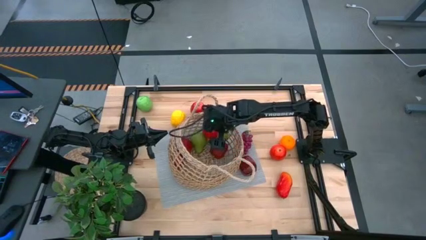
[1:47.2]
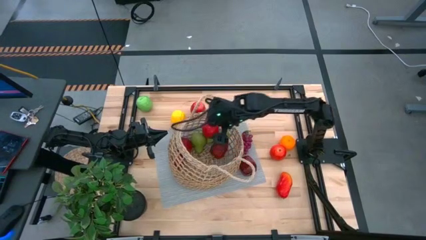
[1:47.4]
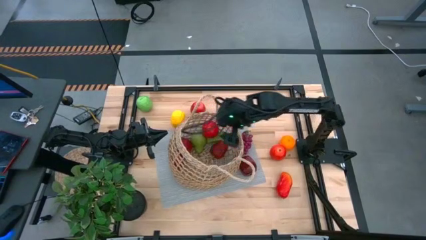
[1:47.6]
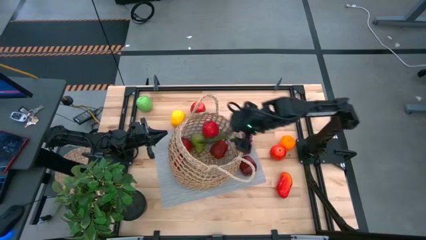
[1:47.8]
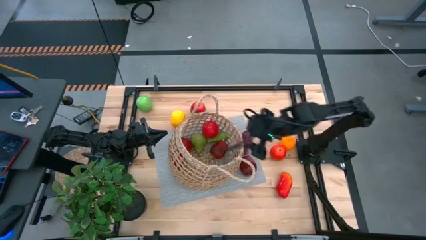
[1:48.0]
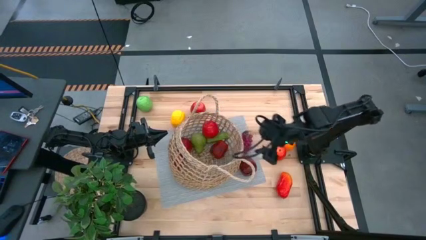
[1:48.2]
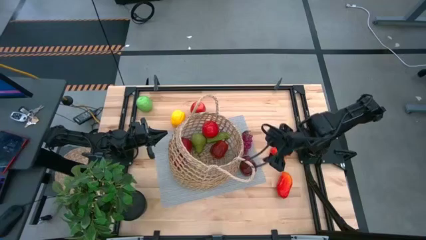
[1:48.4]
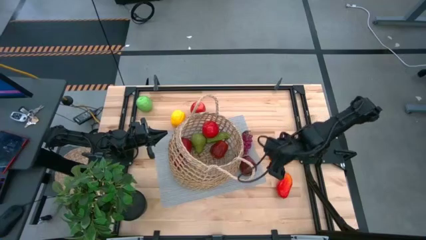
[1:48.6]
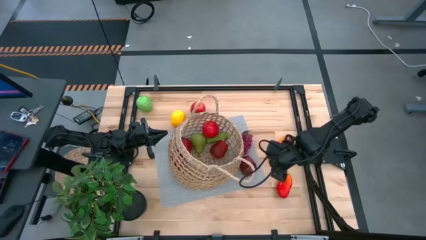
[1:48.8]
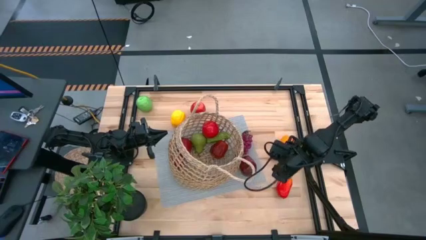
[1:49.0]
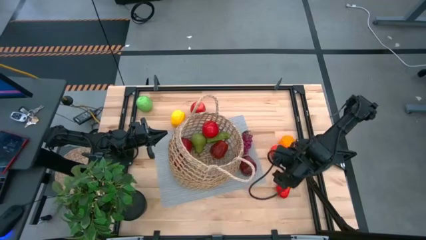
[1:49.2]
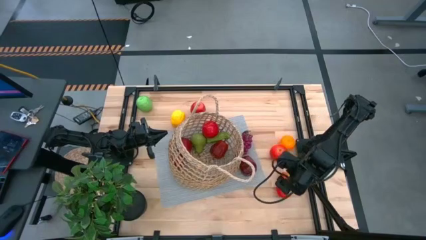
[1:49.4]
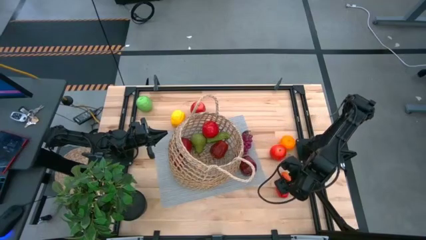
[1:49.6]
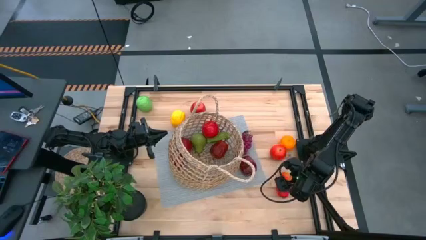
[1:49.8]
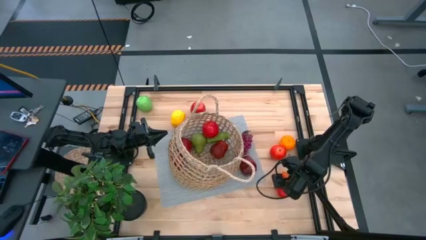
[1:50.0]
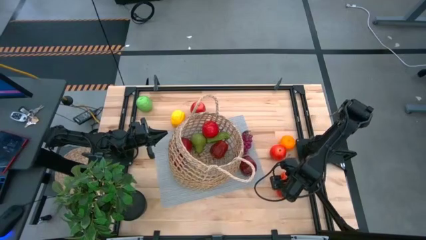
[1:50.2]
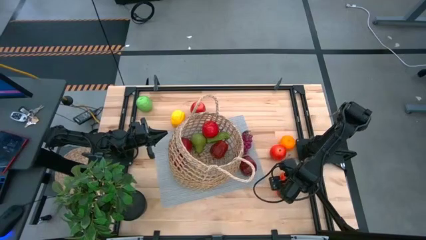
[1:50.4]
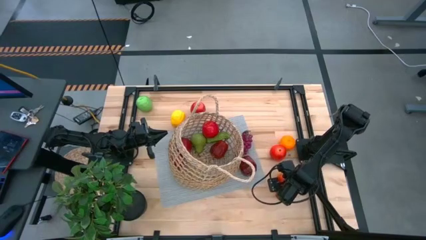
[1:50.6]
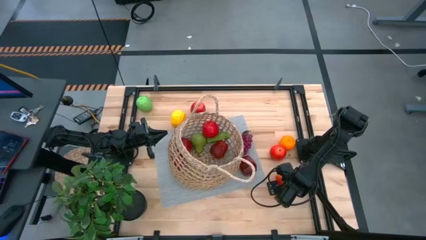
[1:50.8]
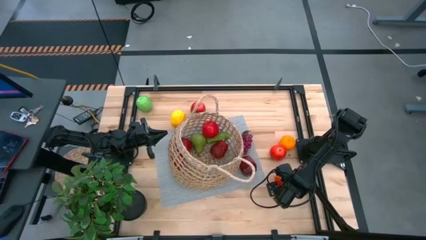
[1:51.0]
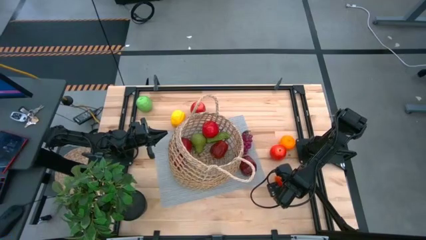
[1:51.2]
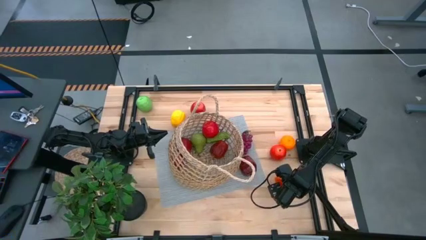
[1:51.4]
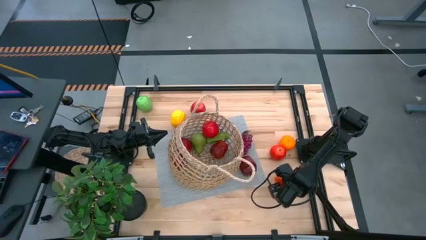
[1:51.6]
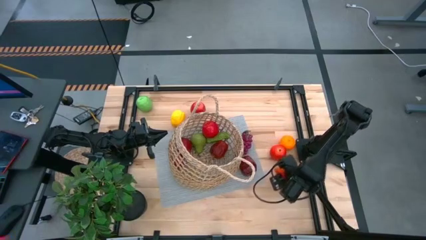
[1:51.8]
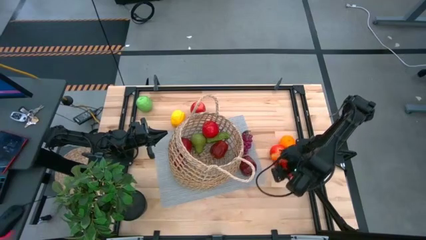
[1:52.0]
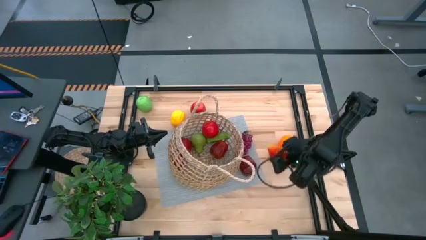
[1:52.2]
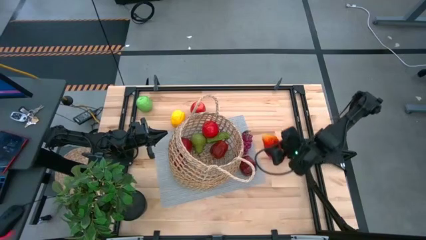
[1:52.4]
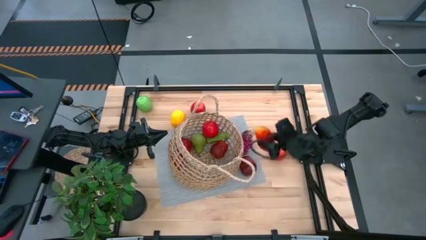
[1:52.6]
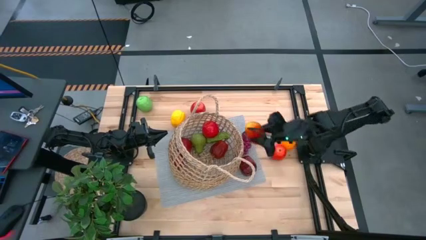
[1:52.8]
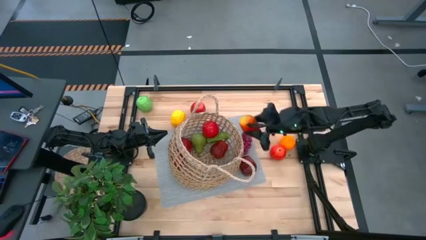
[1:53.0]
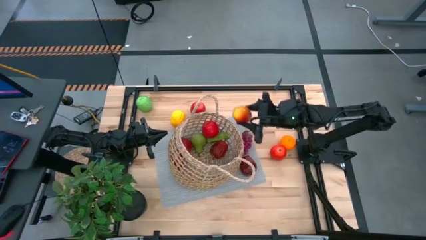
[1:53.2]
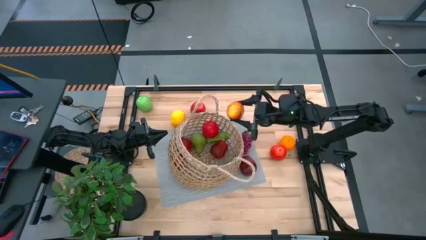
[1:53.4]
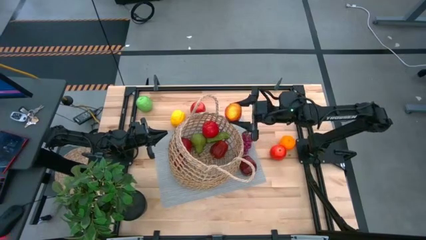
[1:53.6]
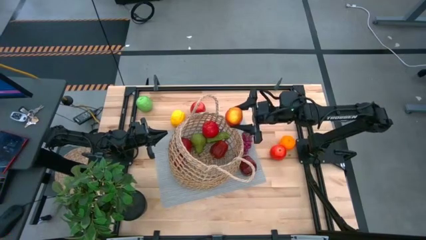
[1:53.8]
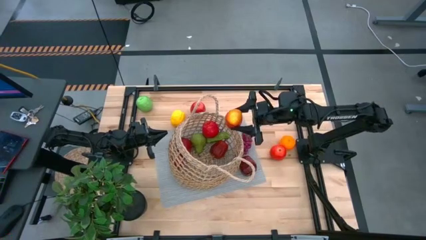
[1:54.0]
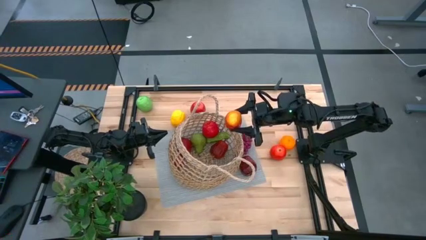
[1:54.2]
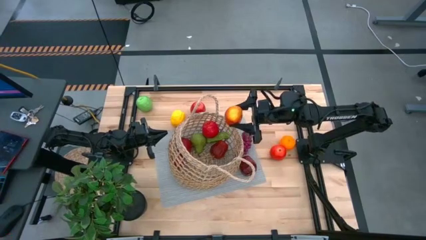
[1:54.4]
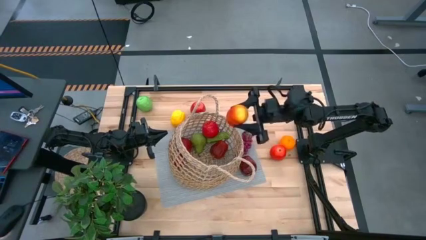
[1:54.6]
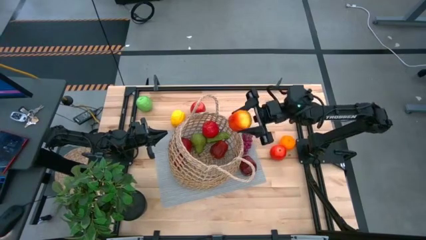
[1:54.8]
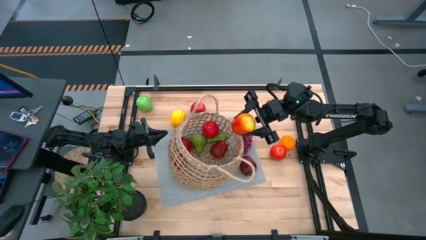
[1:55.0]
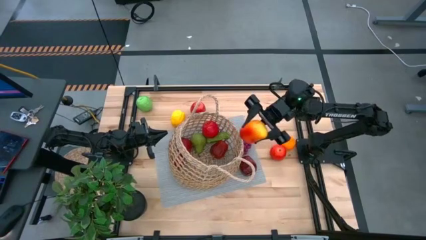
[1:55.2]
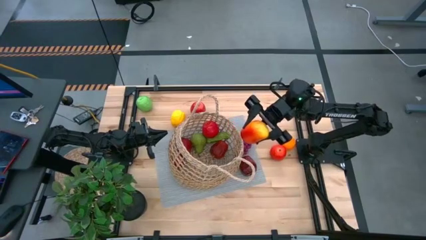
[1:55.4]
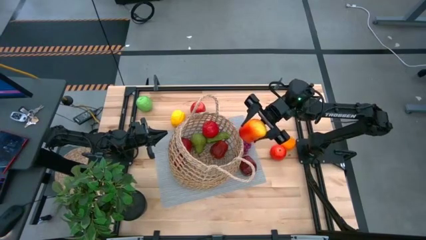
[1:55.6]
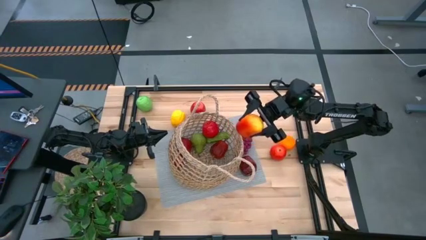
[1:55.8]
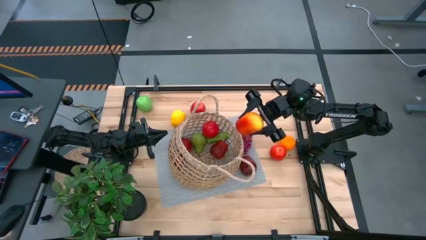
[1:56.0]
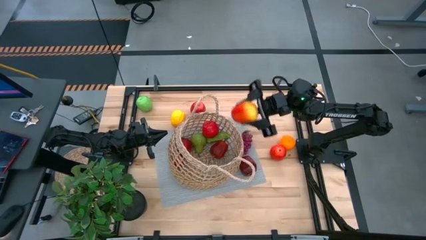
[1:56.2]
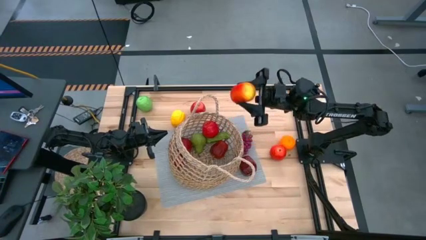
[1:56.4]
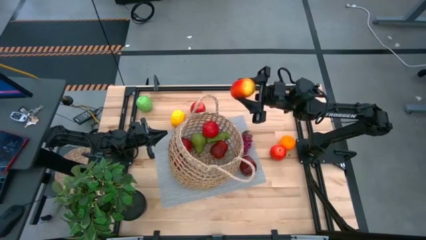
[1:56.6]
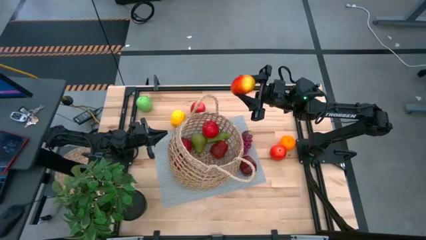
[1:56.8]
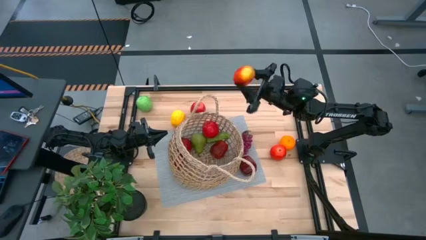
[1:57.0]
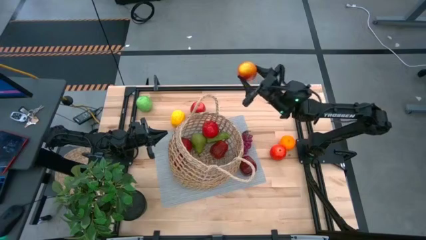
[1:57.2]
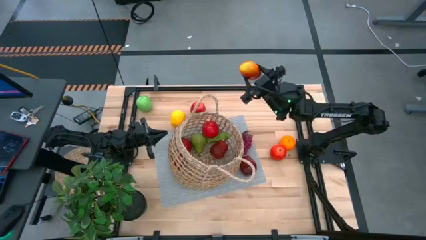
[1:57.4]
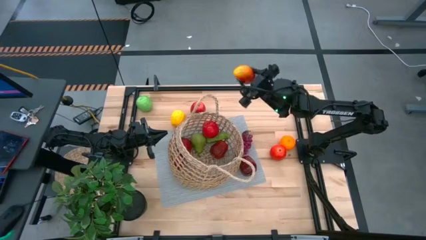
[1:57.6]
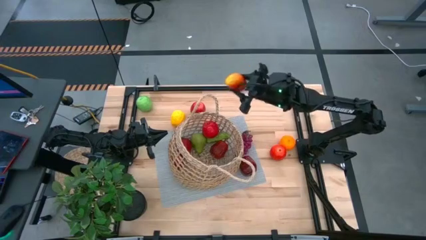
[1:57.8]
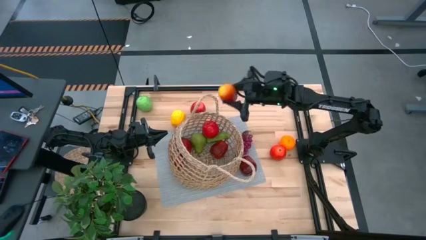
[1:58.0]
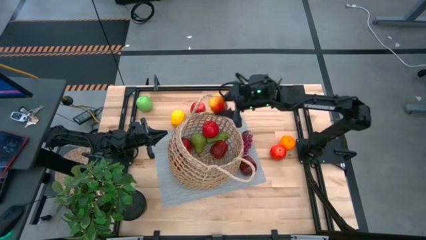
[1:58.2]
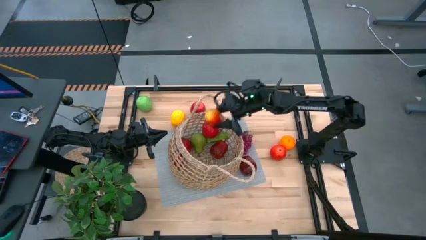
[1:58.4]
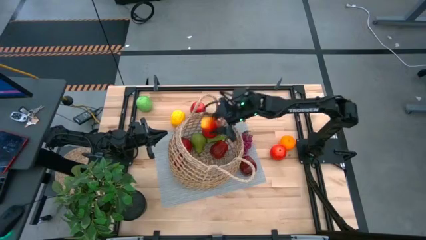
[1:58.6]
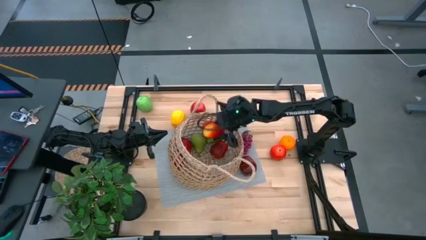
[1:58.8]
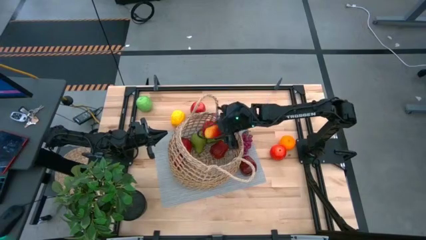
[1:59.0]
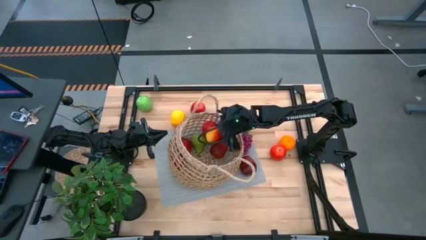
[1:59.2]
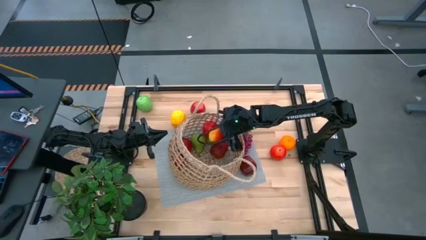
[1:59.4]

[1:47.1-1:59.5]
Task: Build produce basket
Put the mango into the basket

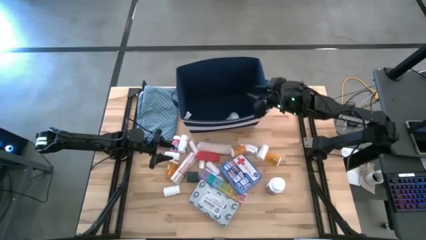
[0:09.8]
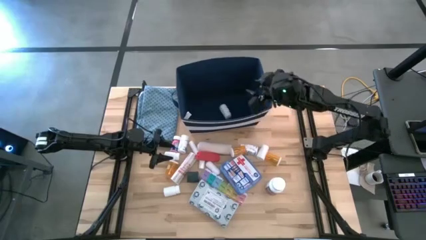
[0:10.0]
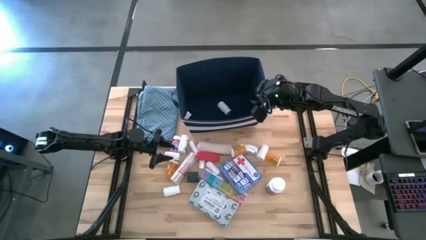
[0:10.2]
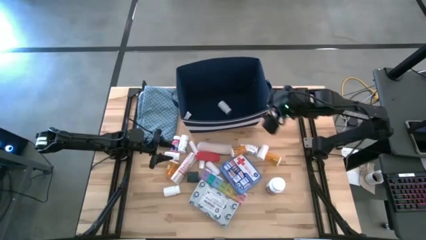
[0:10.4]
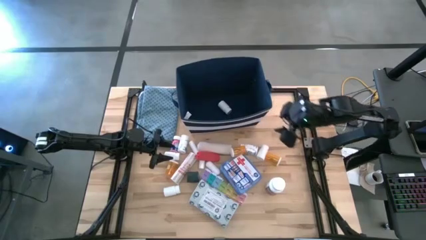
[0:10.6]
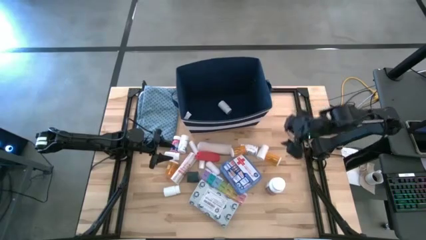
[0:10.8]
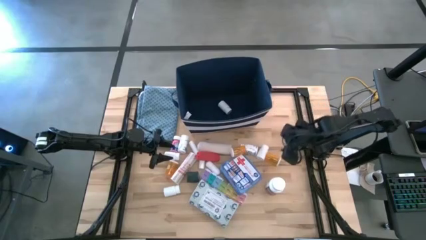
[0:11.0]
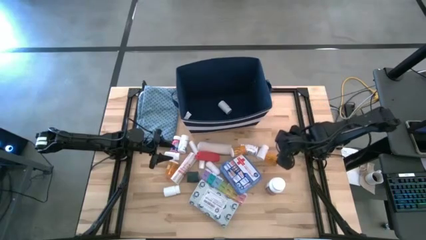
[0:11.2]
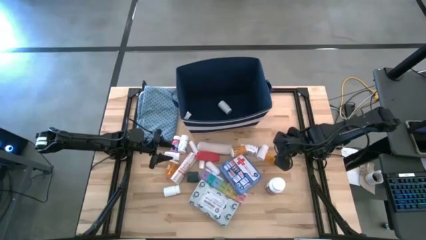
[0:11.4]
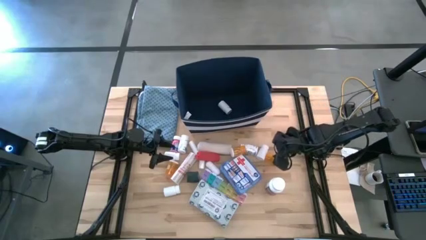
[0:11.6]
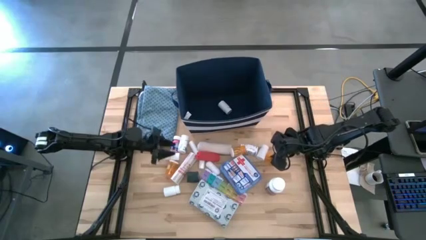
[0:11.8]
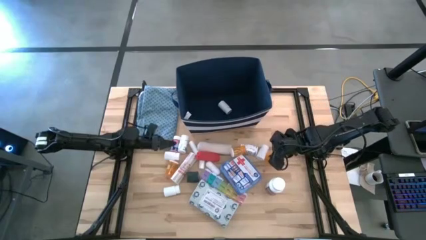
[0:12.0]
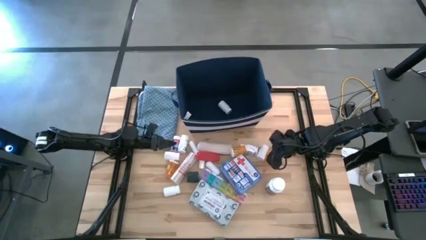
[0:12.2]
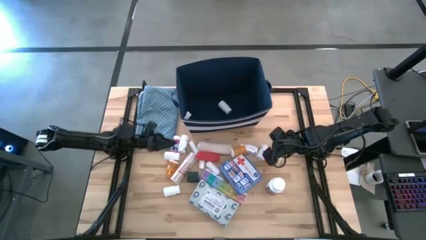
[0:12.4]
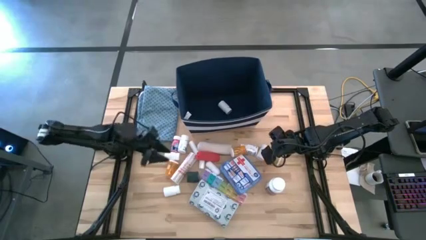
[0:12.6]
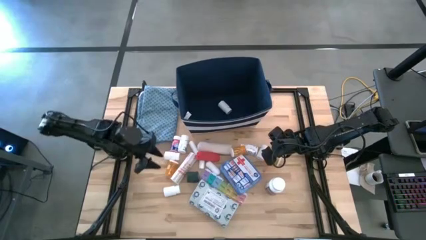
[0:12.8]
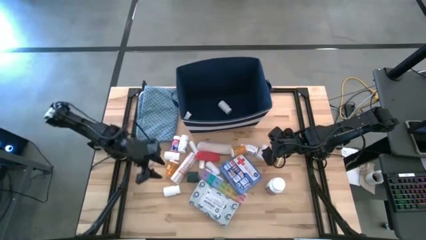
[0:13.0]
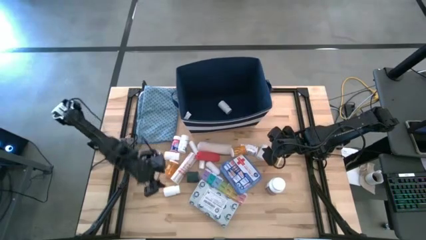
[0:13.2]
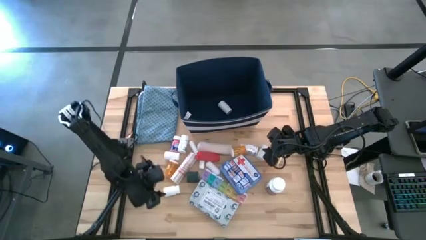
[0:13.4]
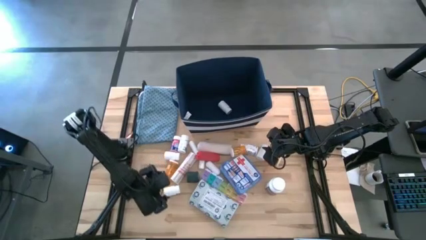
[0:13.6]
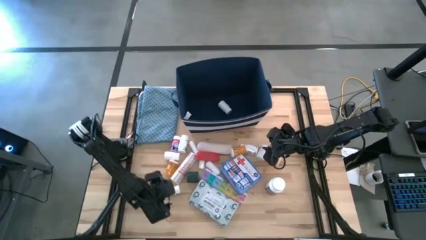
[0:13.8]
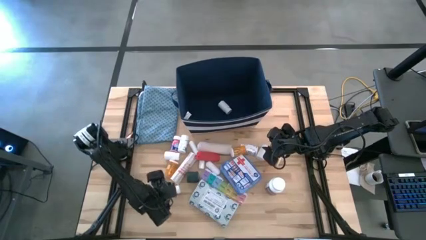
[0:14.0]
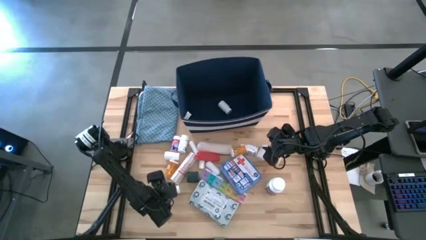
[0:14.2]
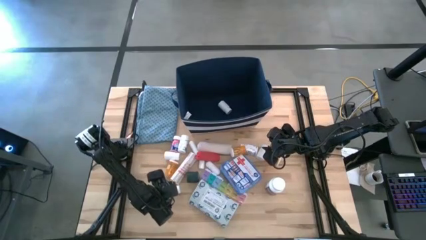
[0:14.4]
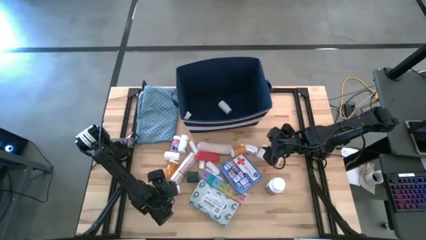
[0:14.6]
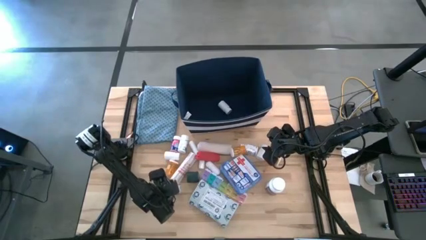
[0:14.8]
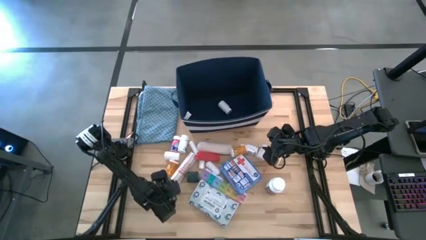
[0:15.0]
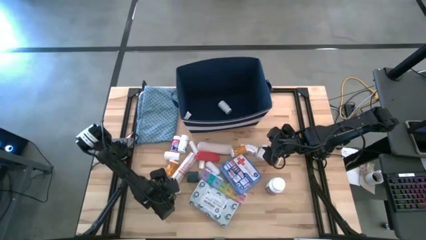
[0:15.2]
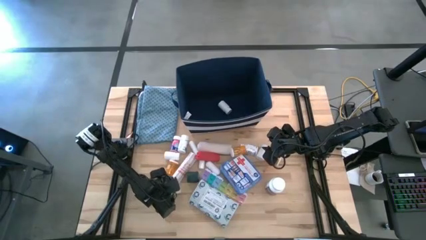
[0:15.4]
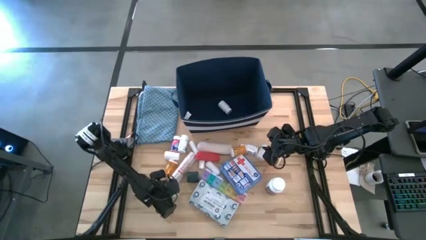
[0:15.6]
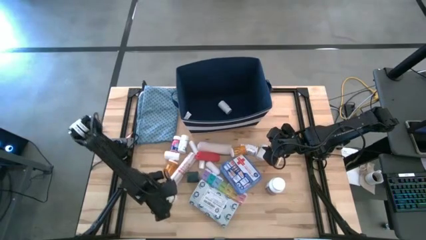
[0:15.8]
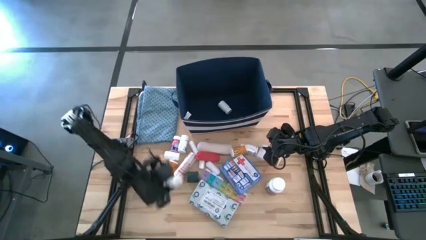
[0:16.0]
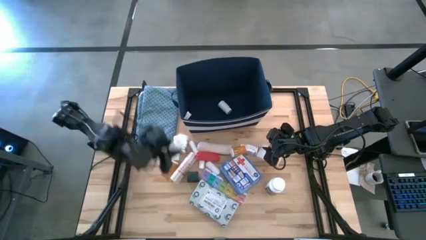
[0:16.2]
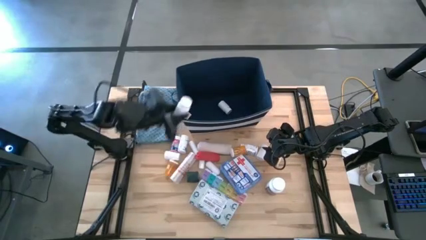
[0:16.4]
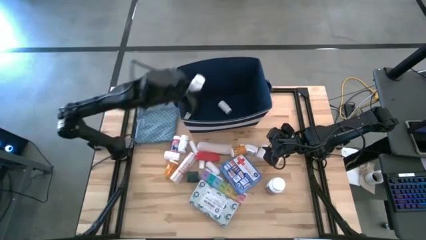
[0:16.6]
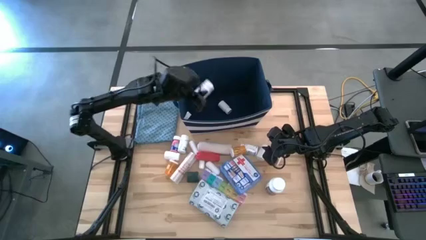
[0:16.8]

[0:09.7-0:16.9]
Task: Pick & place medical supplies in basket/bin
Put the white pill bottle into the blue bin
